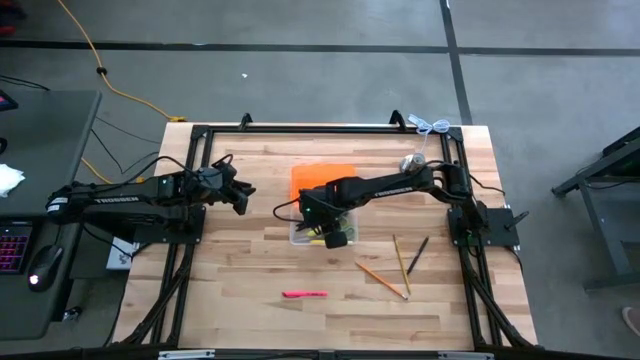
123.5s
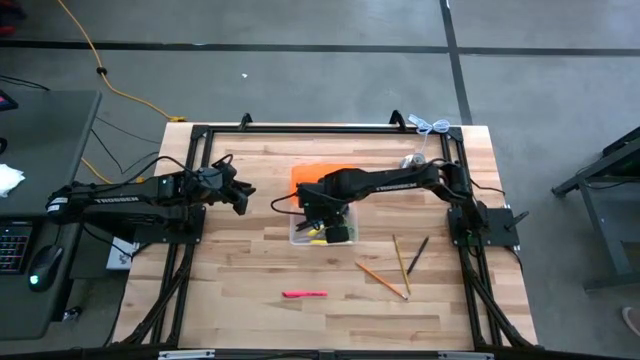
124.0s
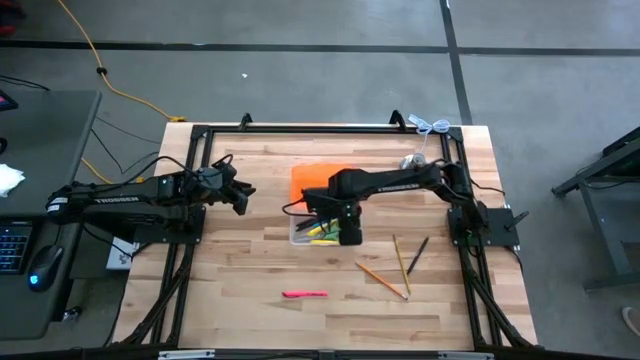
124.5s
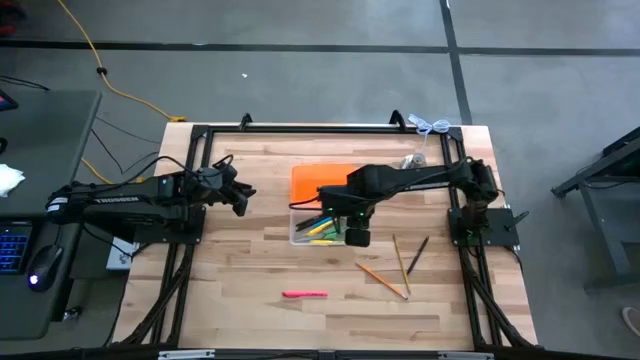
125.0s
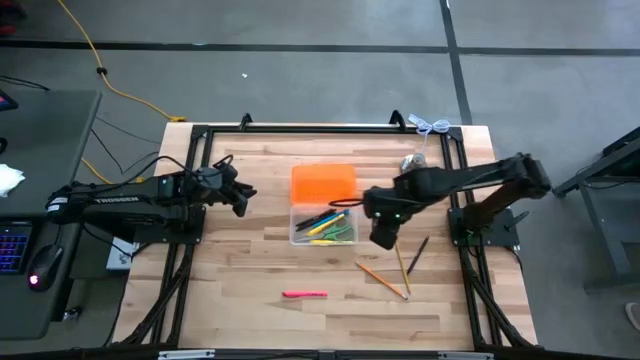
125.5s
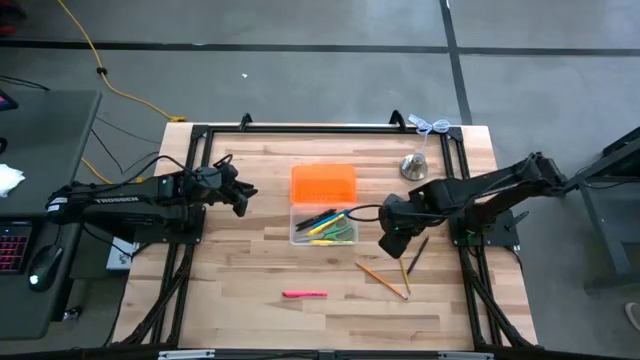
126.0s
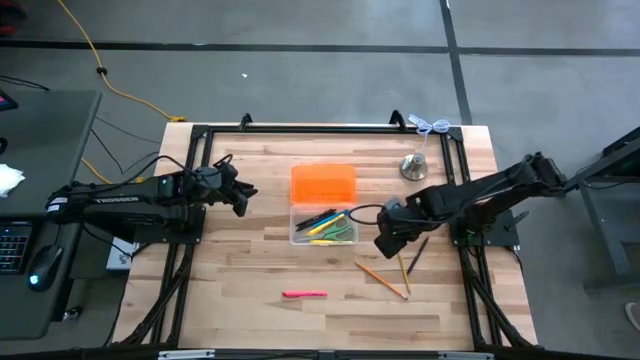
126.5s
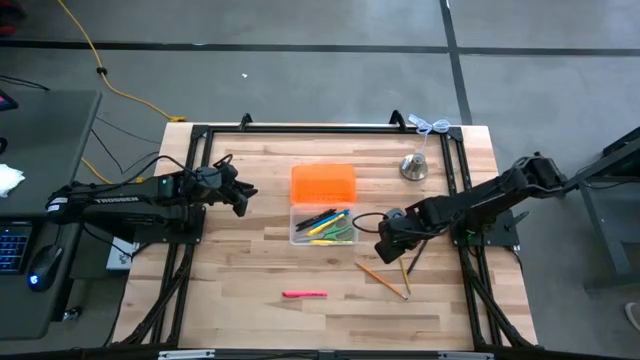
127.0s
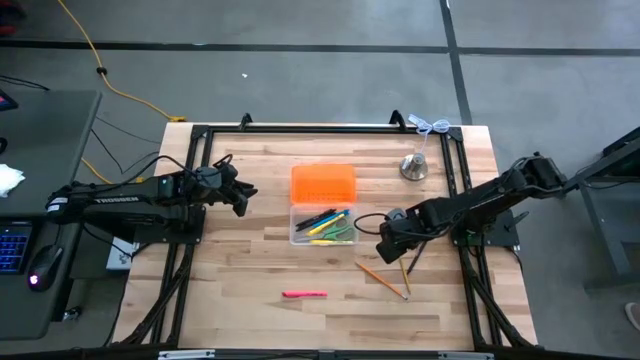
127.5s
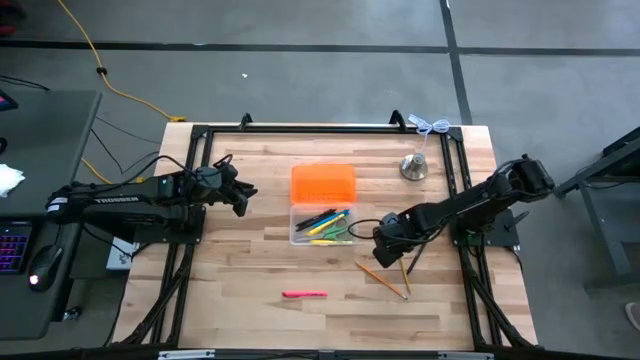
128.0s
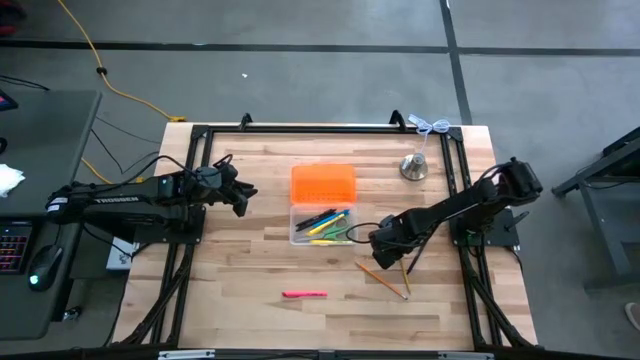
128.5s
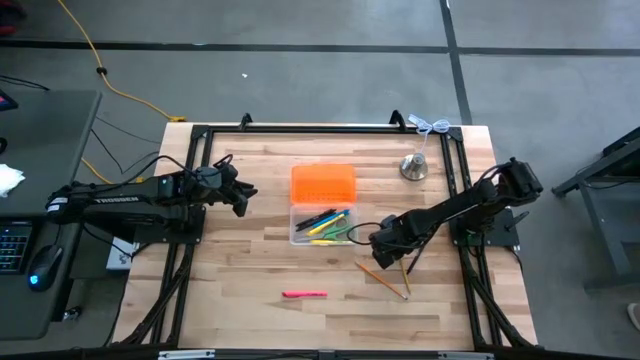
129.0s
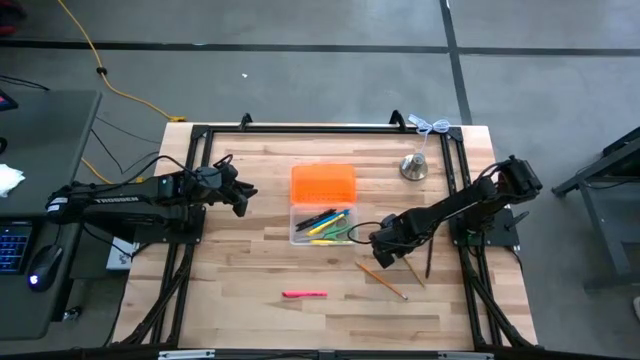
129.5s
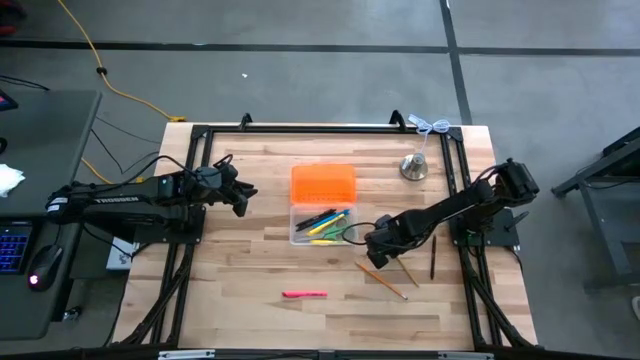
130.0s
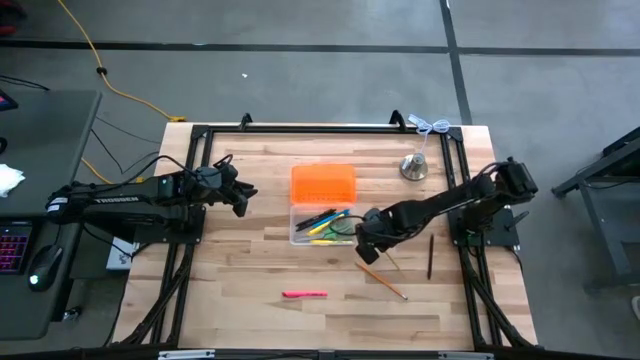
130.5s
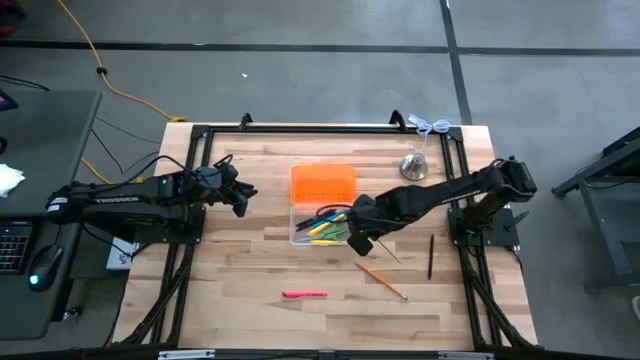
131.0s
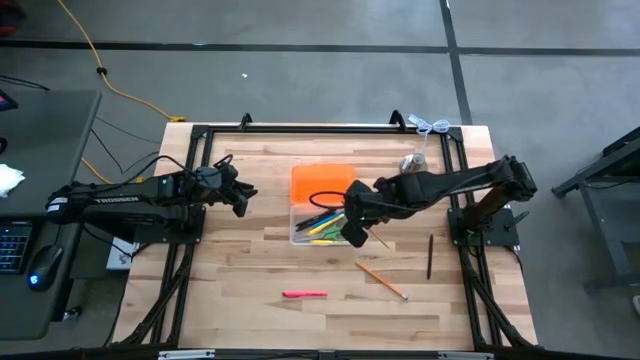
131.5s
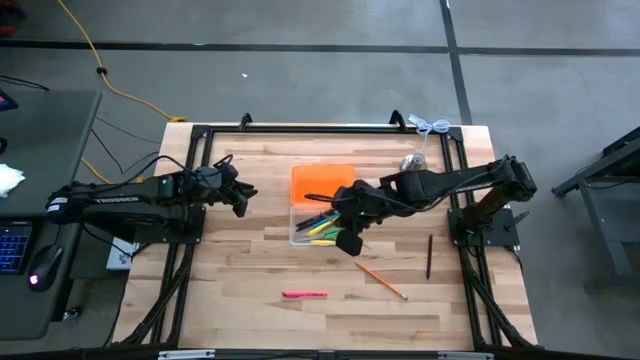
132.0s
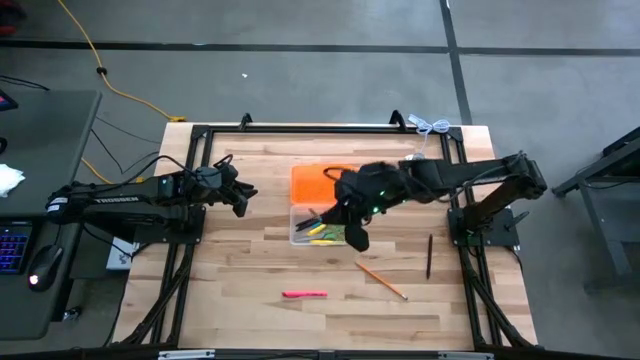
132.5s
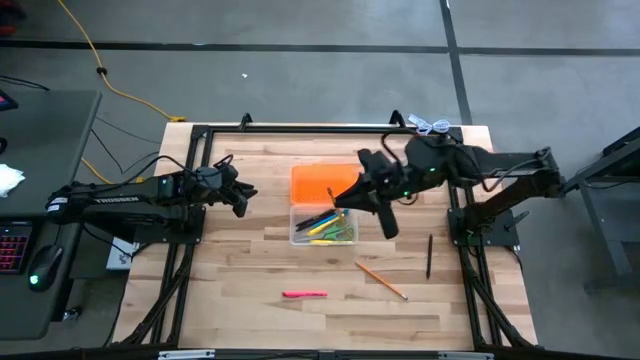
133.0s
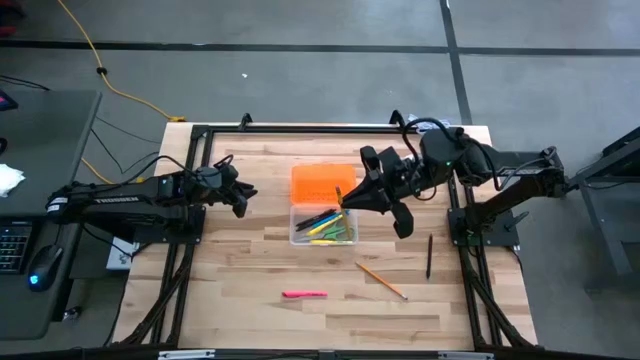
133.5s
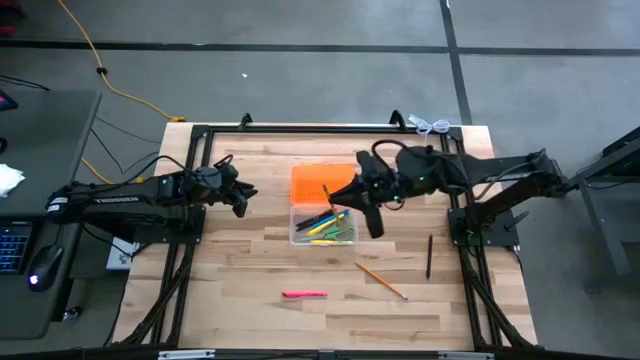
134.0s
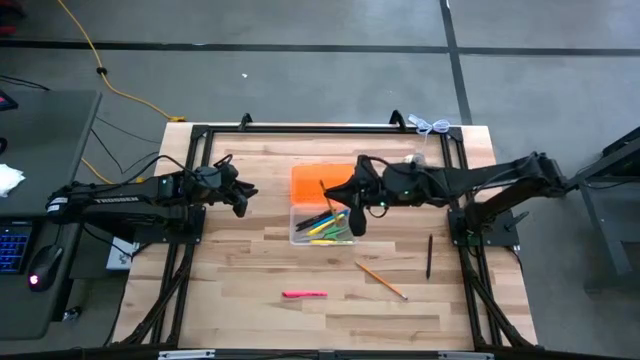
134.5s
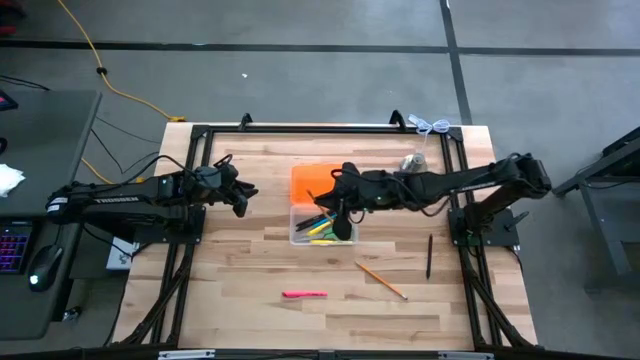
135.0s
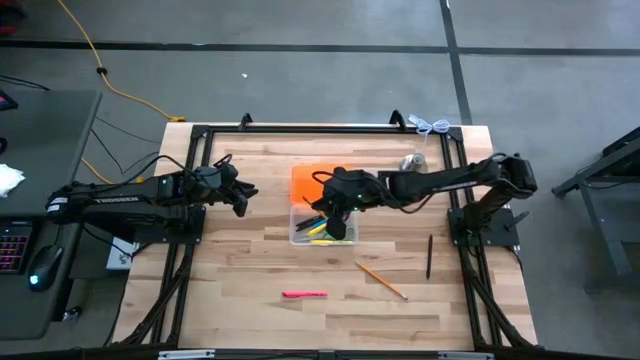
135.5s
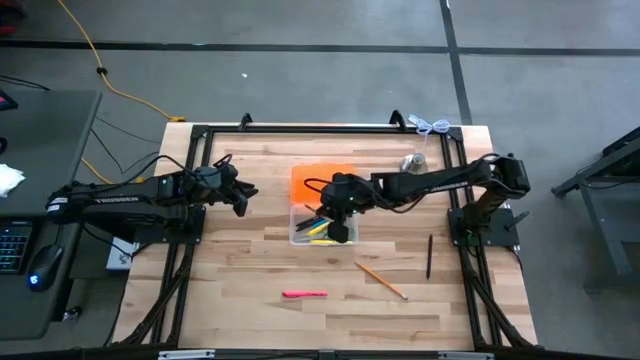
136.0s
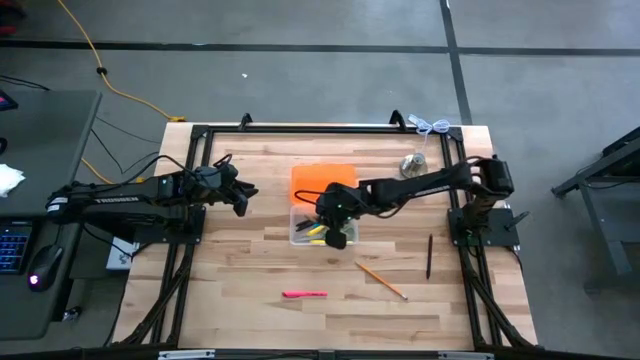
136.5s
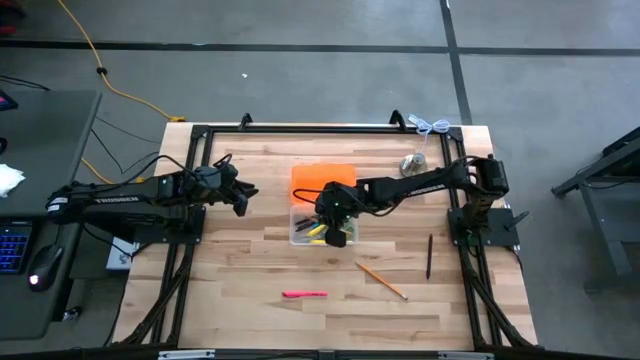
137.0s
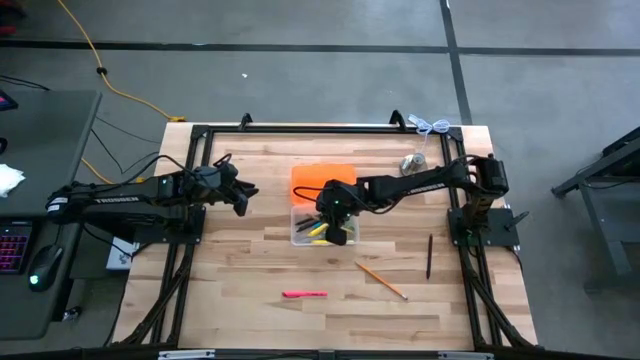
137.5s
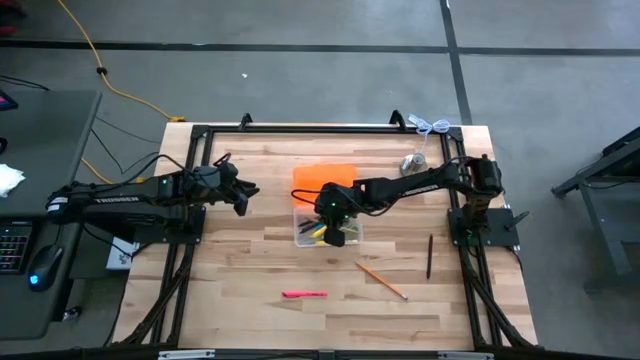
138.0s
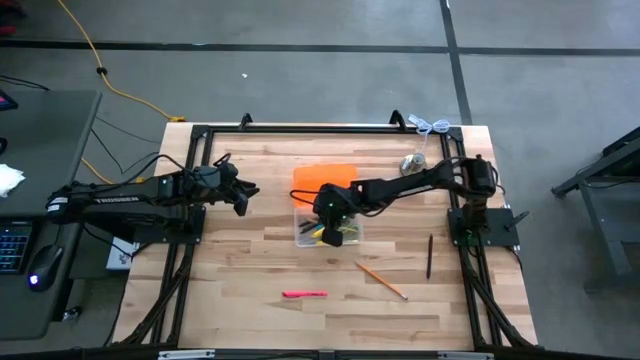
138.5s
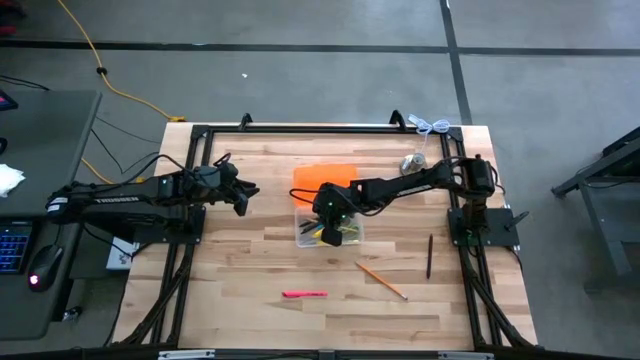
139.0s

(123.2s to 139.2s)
Task: Pick & place school supplies into a supply box
Put the yellow pencil into the orange supply box

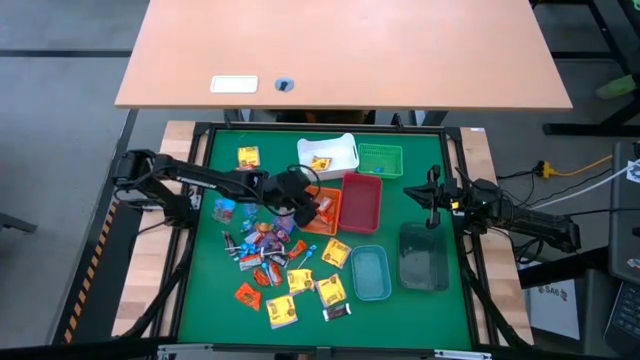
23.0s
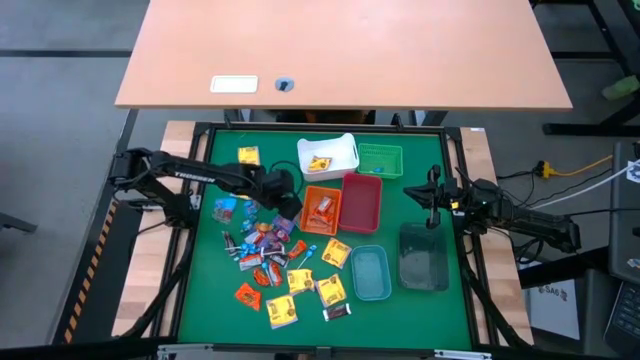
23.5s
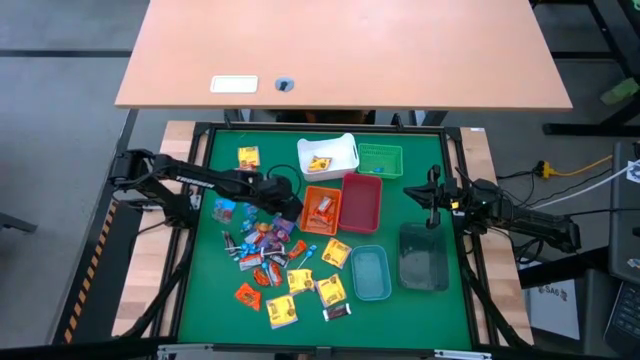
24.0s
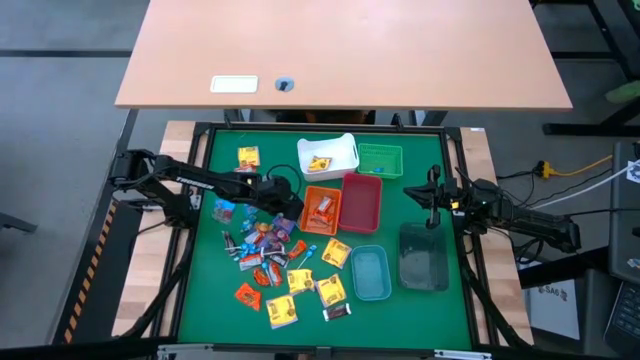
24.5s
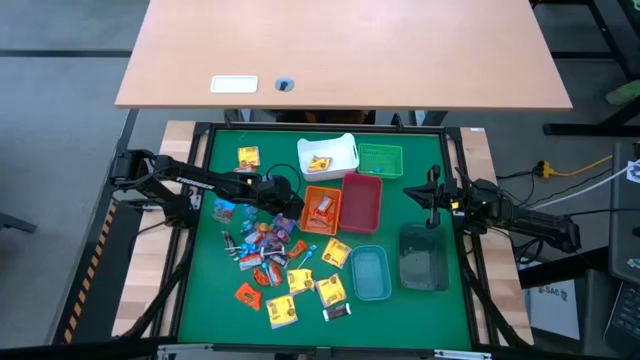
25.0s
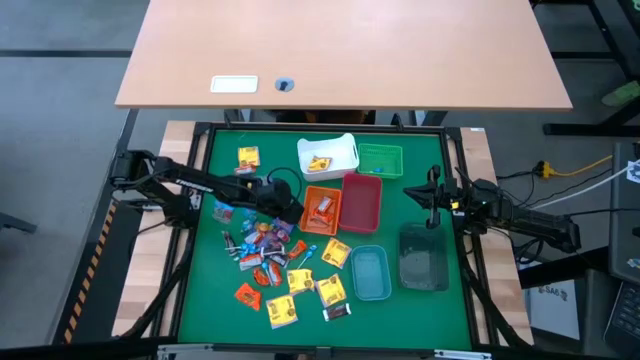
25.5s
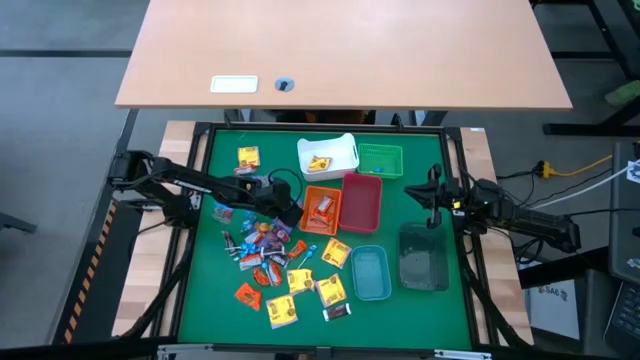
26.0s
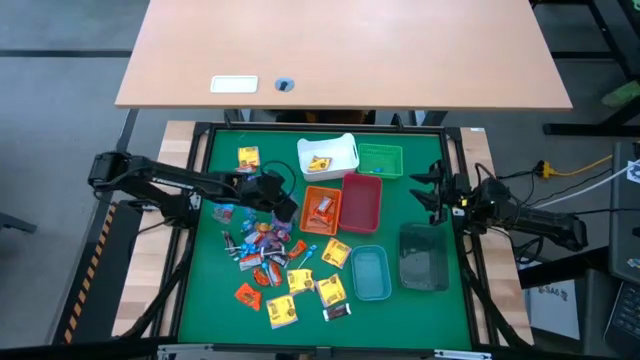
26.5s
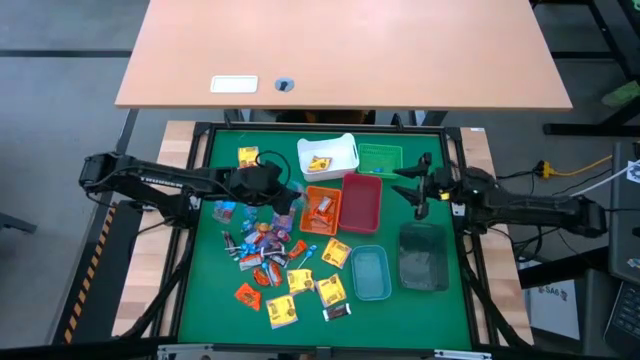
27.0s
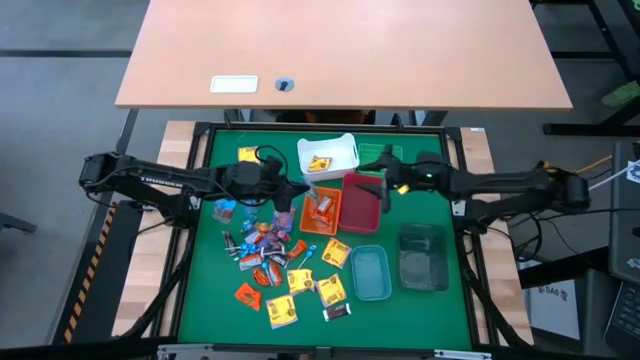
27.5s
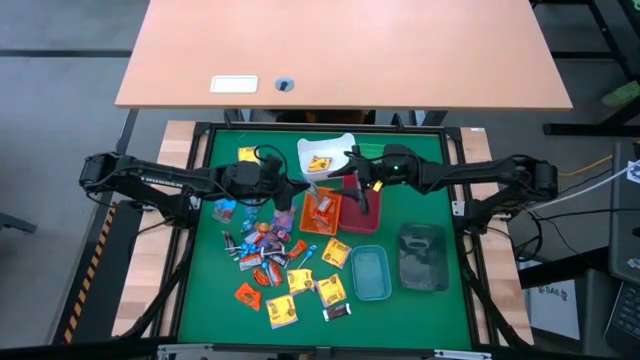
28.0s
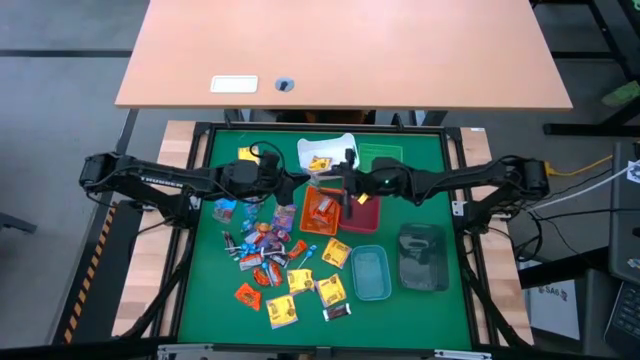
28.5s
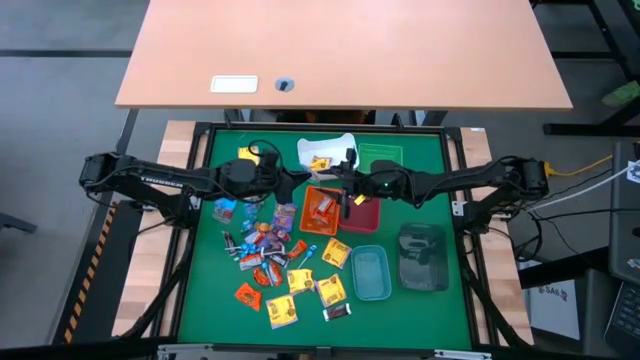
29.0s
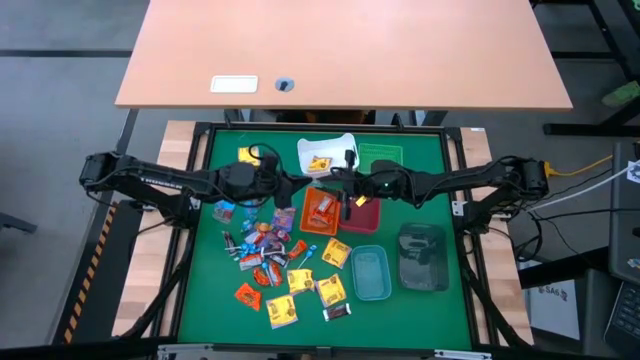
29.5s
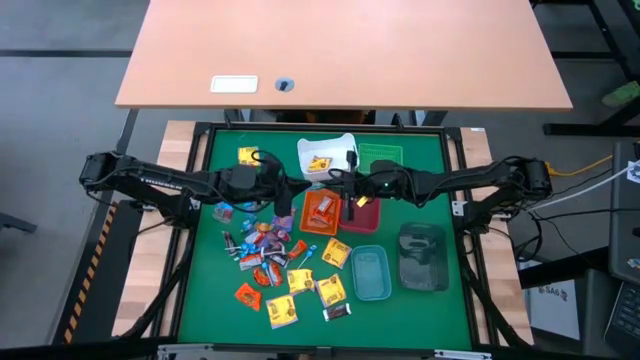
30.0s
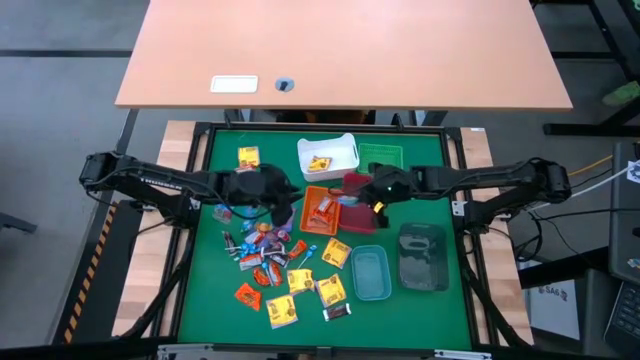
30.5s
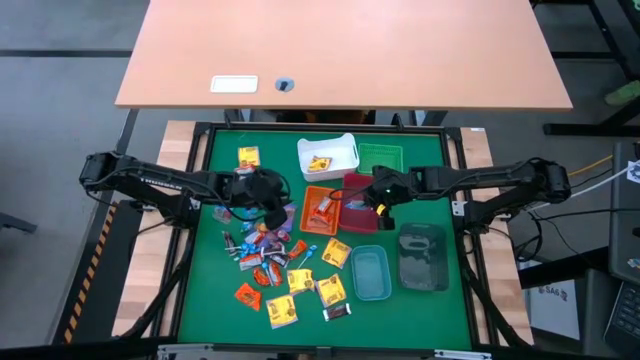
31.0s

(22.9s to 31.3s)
Task: Sort candy
Put the blue bag of candy into the red bin
